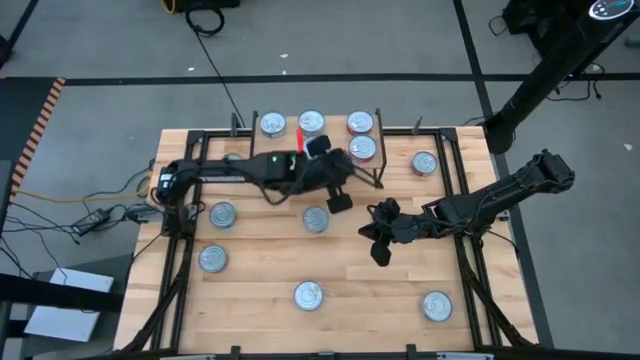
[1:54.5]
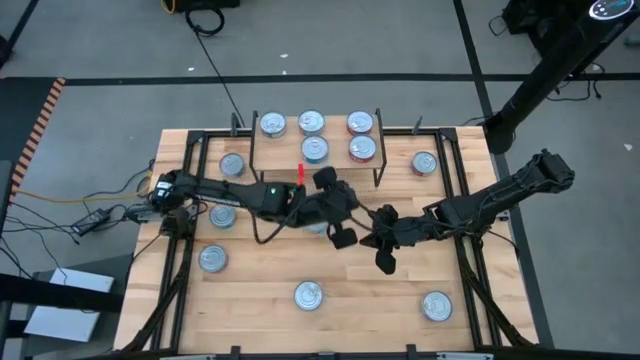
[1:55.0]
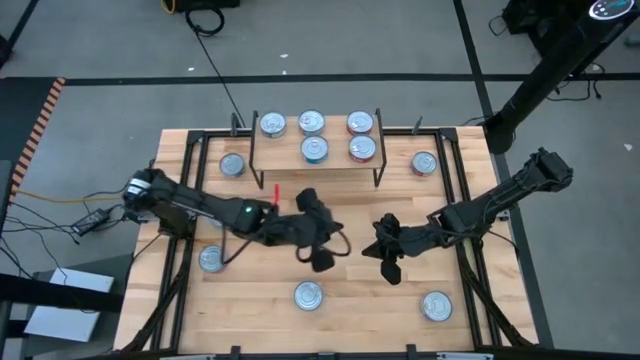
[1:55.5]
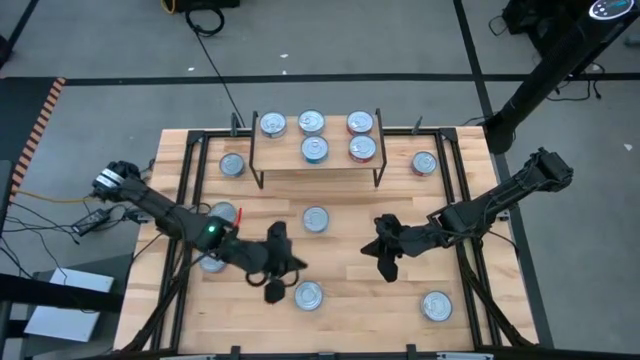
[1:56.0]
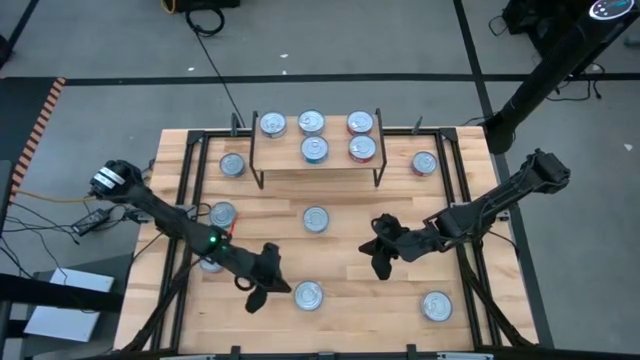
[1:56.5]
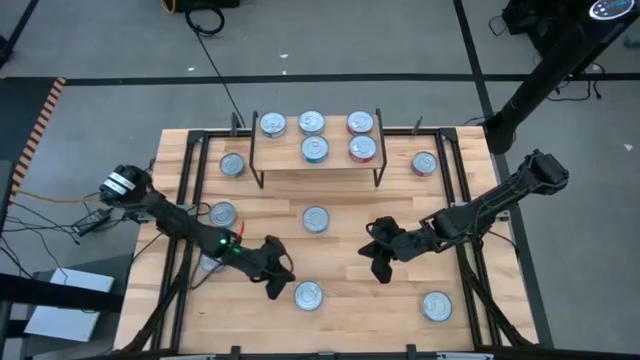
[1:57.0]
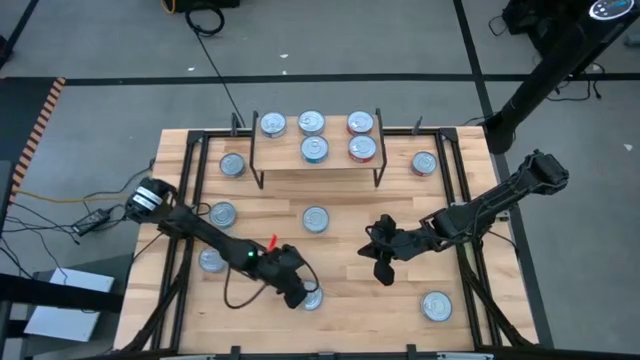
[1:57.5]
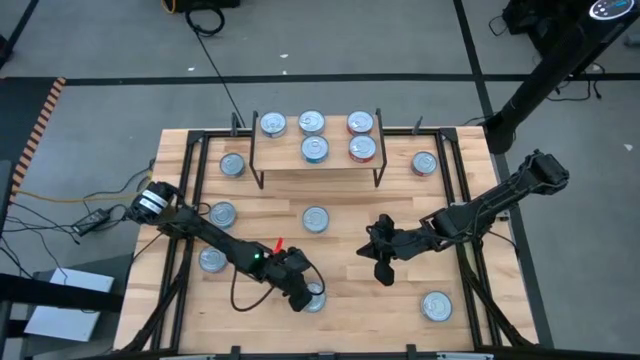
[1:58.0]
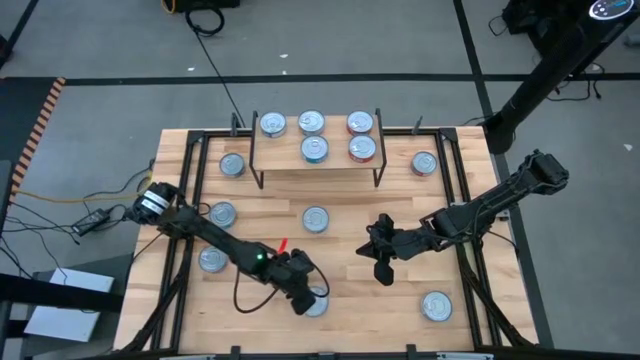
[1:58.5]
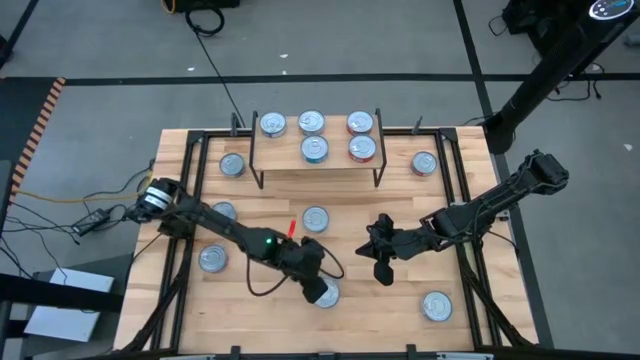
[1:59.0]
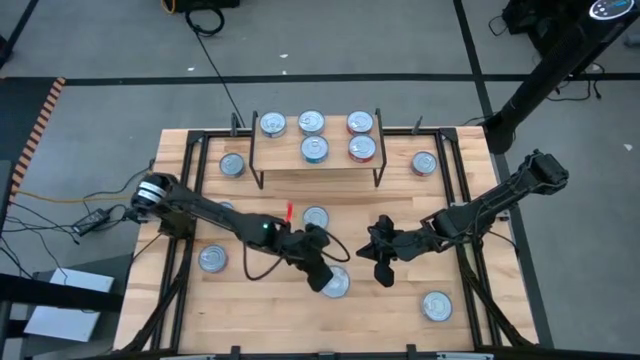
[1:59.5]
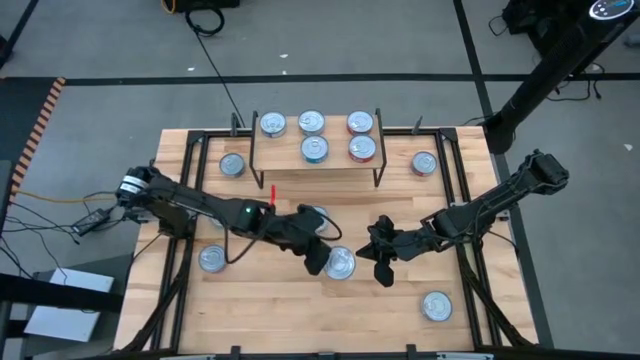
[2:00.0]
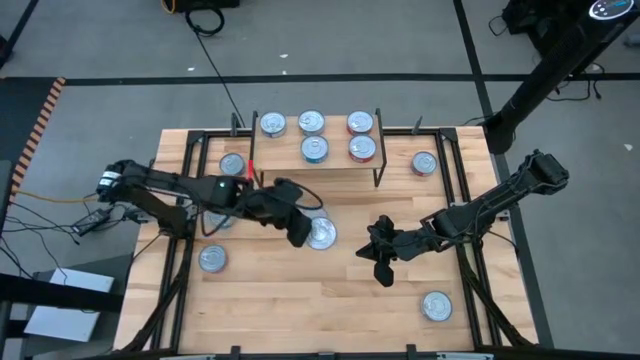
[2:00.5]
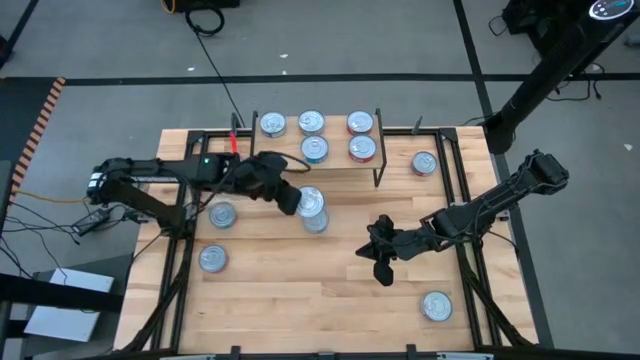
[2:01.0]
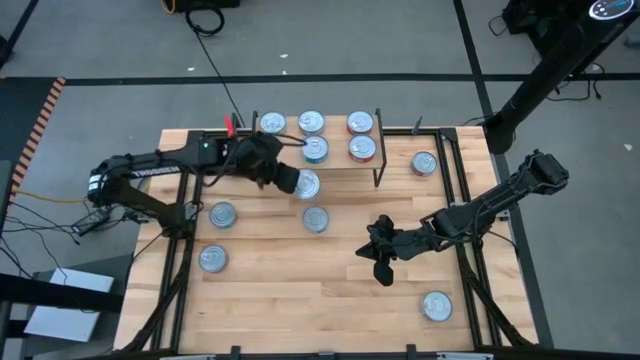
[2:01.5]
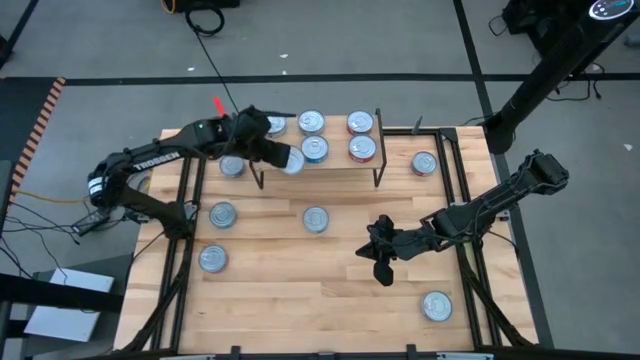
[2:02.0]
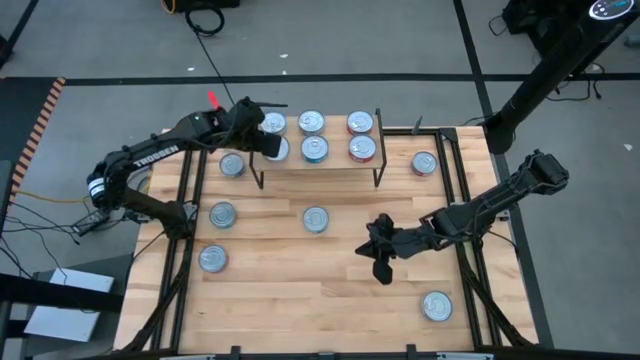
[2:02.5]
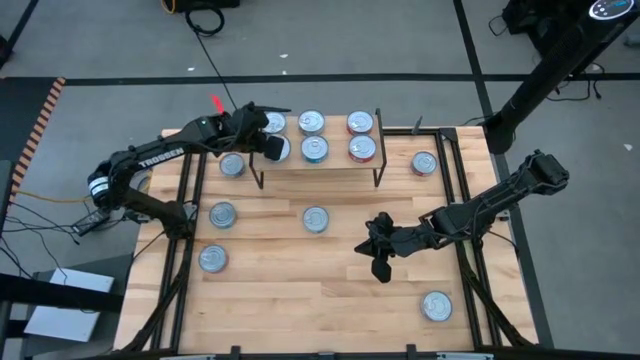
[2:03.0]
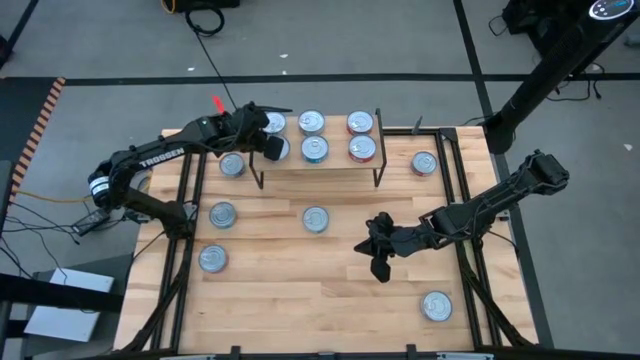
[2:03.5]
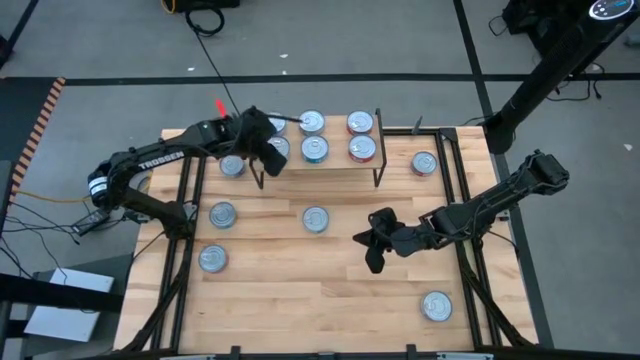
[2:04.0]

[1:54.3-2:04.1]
Task: Stack canned seafood by type on shelf
Put the blue tuna can on the shelf

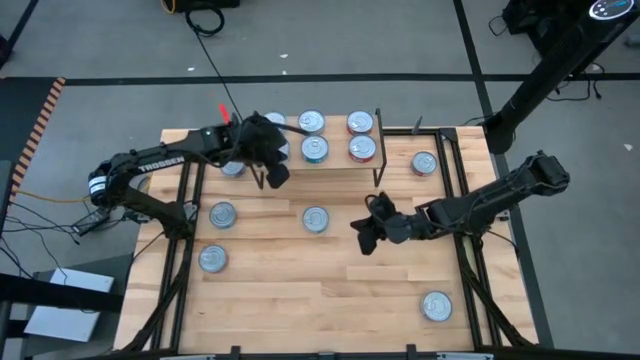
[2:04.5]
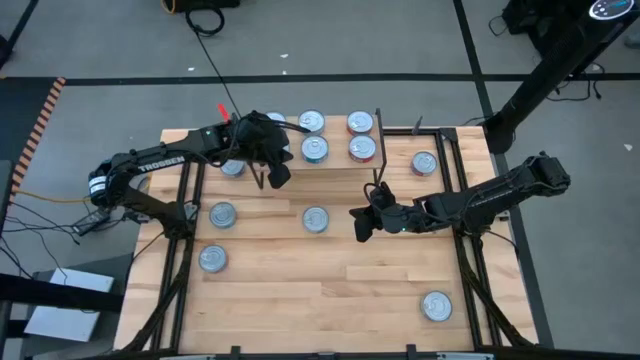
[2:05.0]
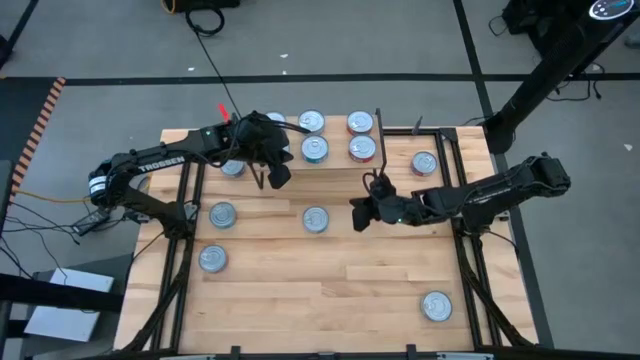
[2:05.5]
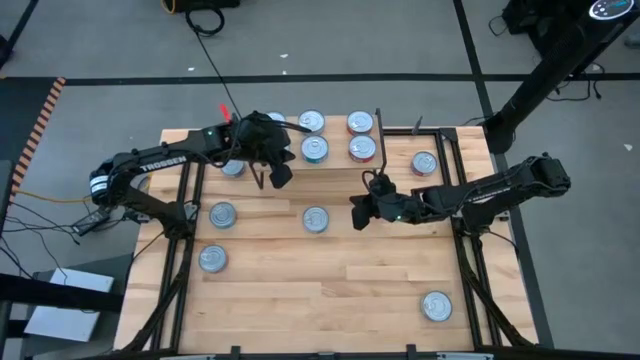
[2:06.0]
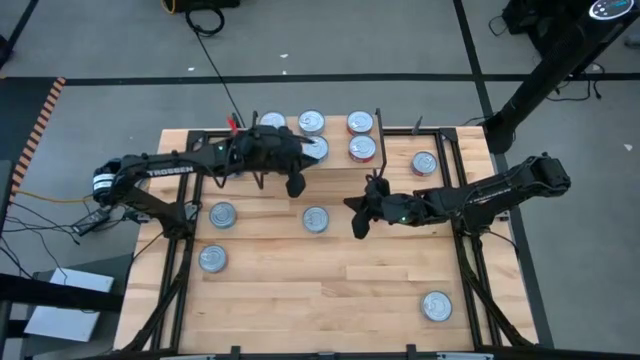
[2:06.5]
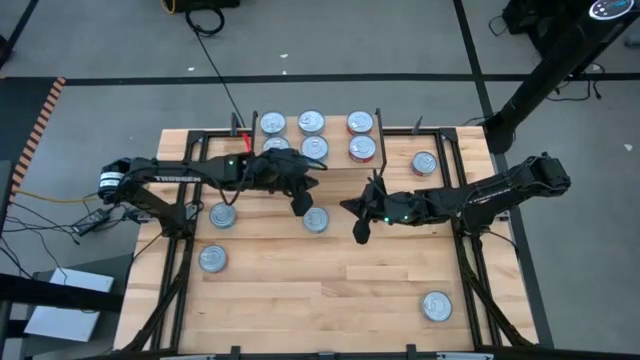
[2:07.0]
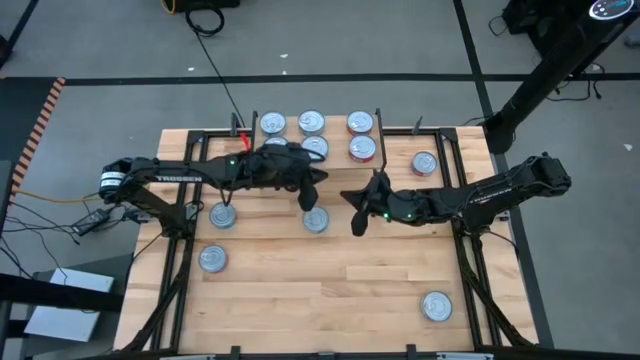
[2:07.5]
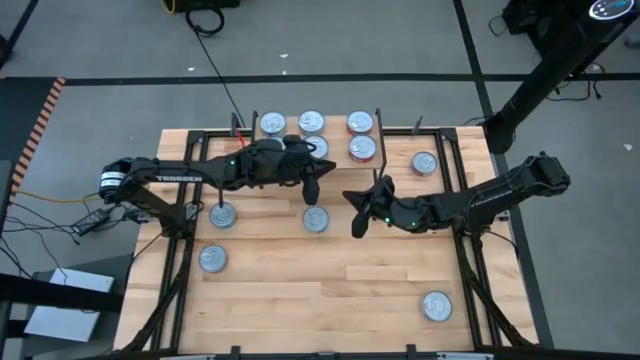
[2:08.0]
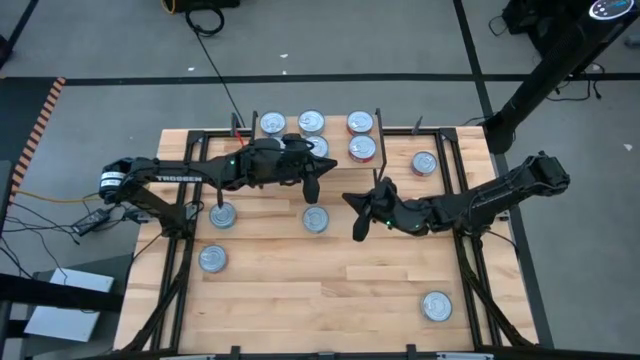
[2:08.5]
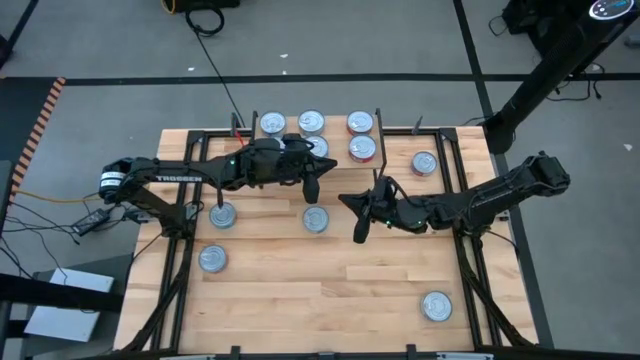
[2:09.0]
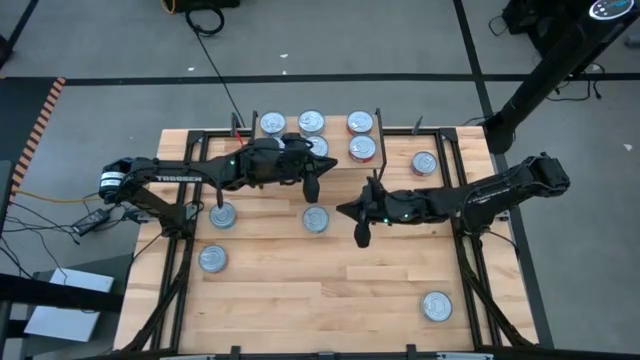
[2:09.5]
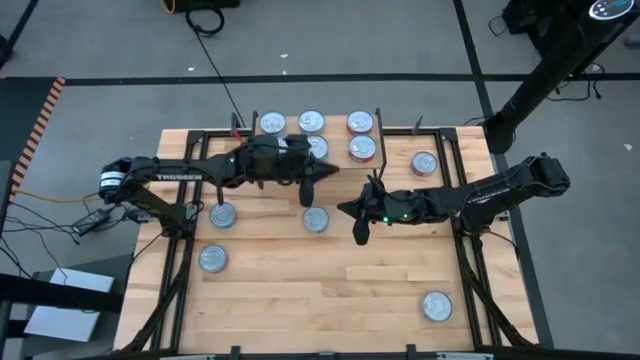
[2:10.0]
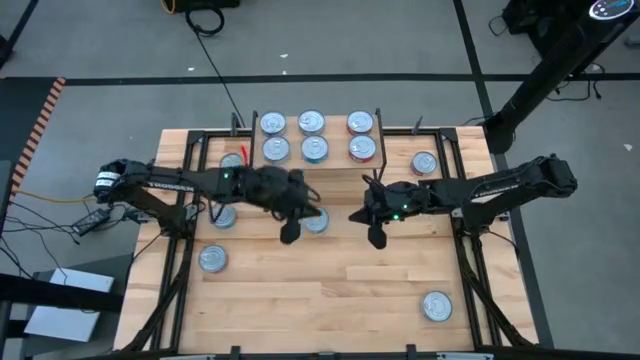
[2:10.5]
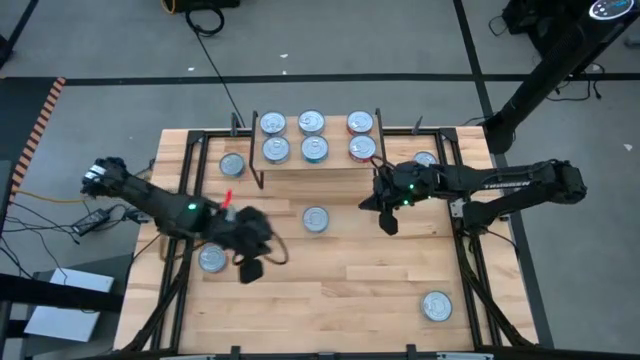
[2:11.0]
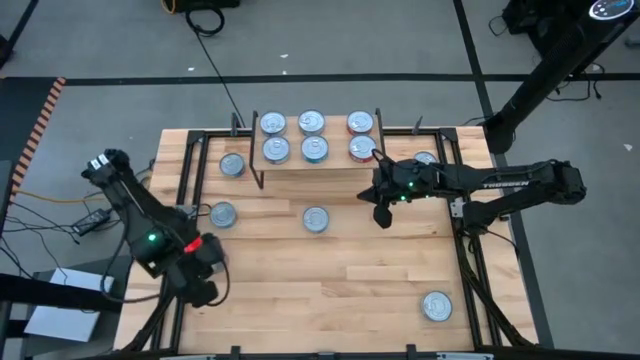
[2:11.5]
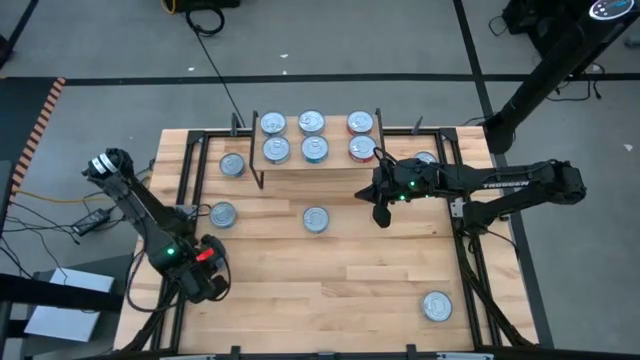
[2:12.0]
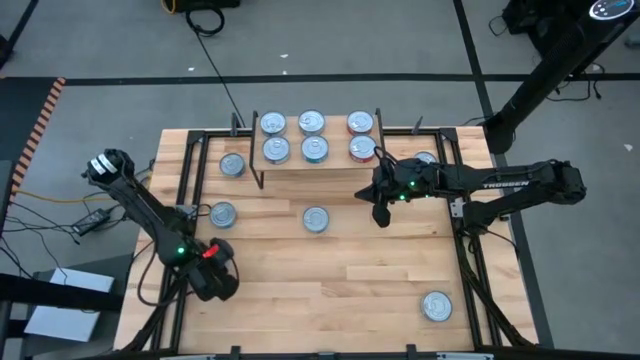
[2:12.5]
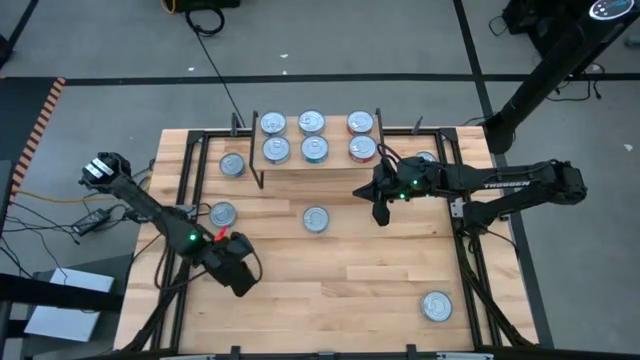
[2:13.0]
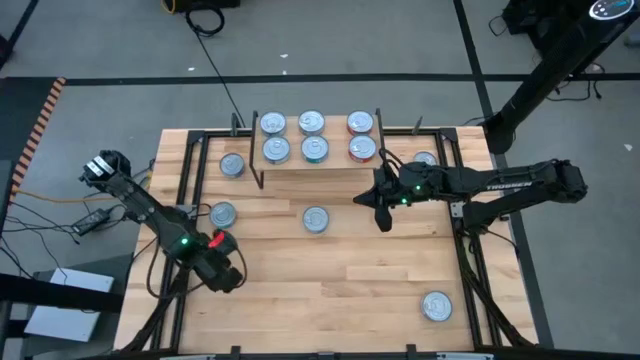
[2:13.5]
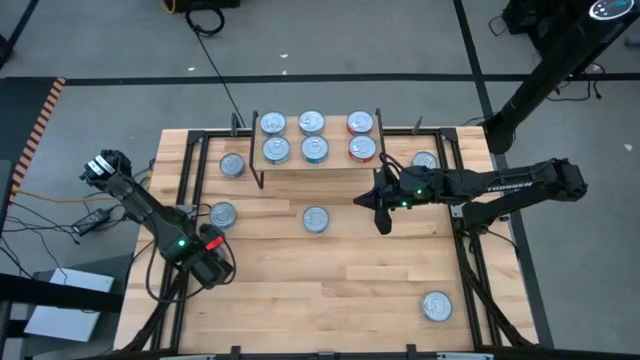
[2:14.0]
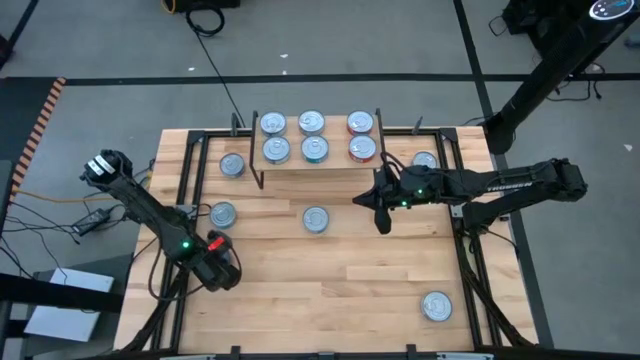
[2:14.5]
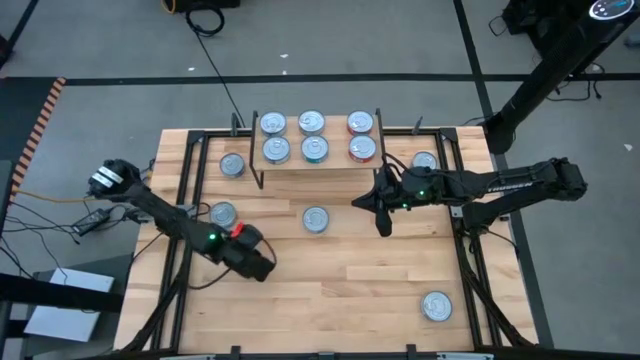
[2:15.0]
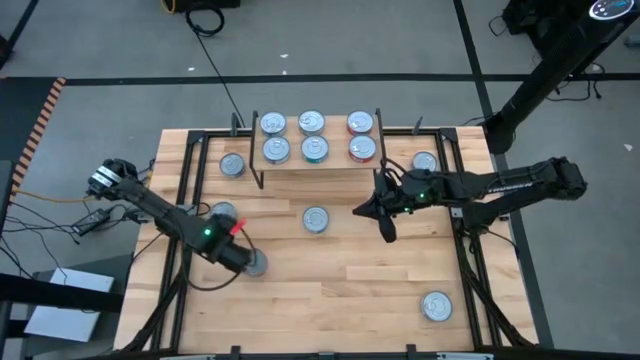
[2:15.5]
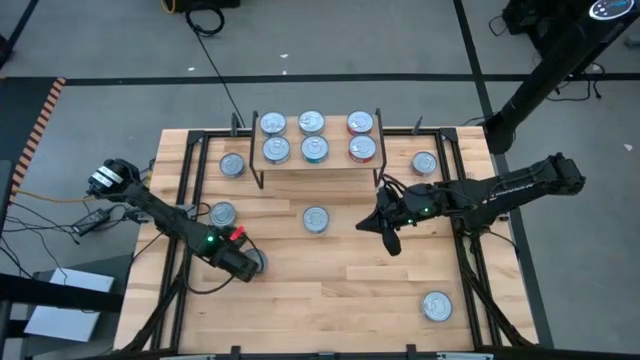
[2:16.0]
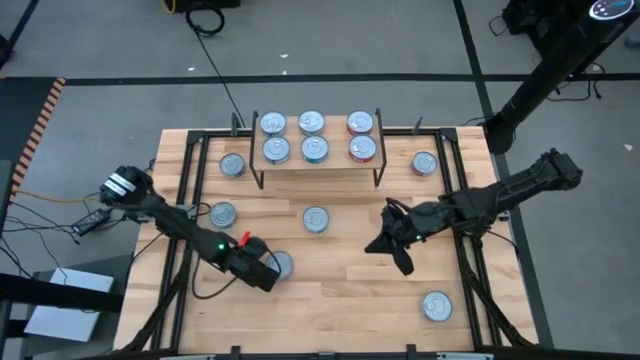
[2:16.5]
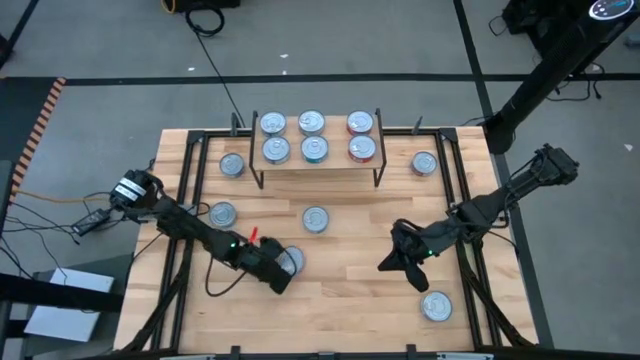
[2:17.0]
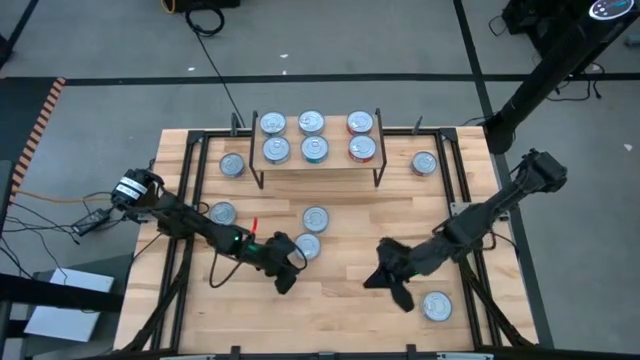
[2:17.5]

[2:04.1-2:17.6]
Stack the red tuna can on top of the other red tuna can on the shelf
